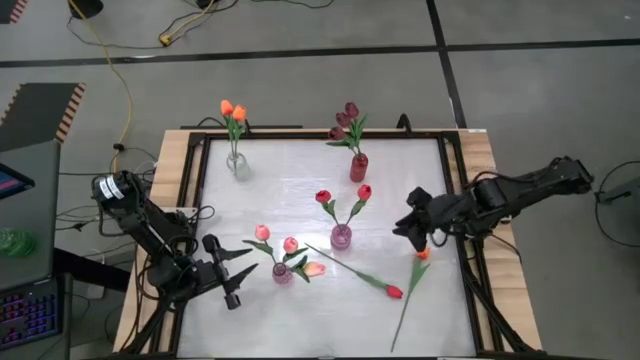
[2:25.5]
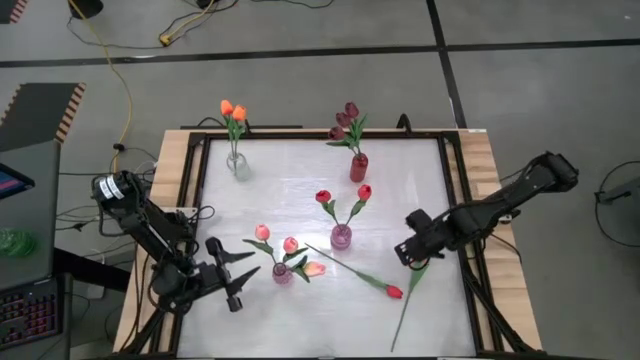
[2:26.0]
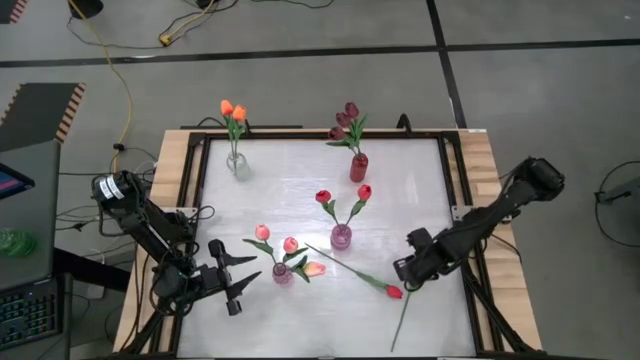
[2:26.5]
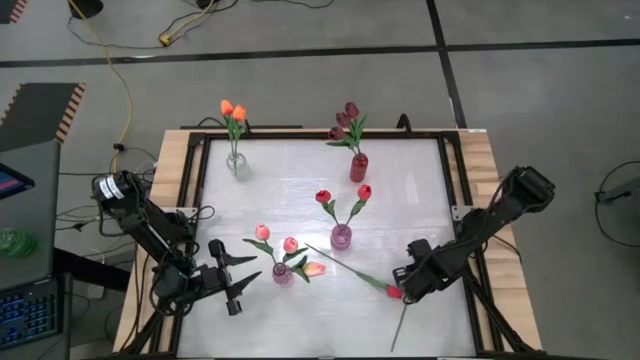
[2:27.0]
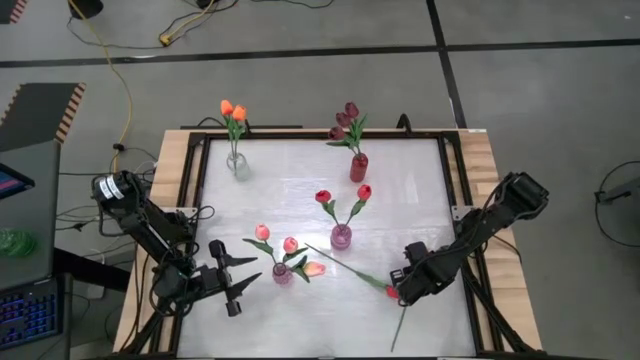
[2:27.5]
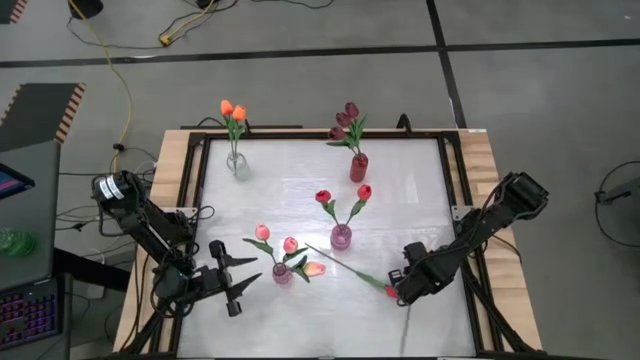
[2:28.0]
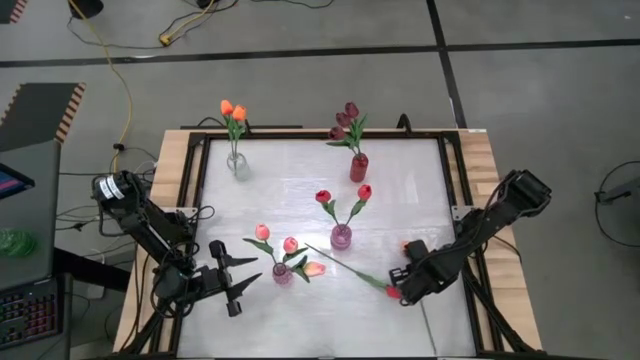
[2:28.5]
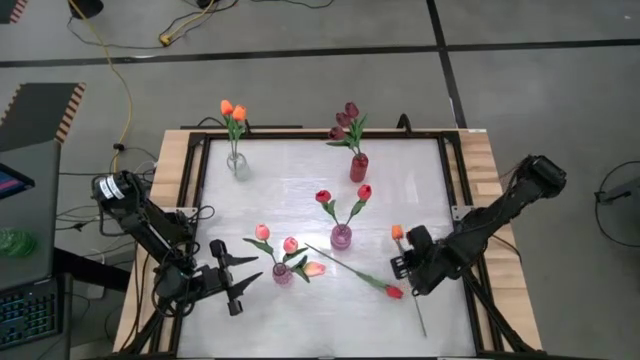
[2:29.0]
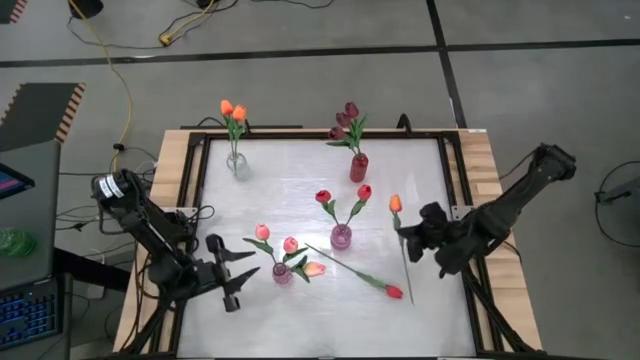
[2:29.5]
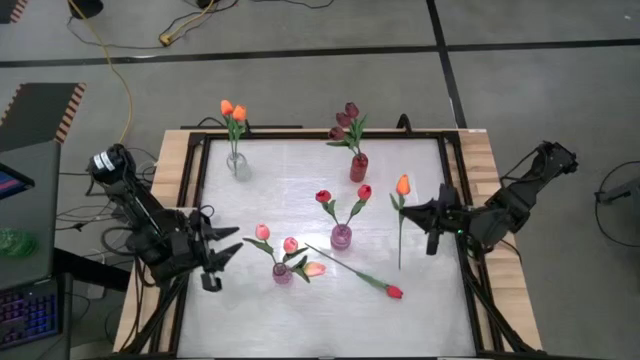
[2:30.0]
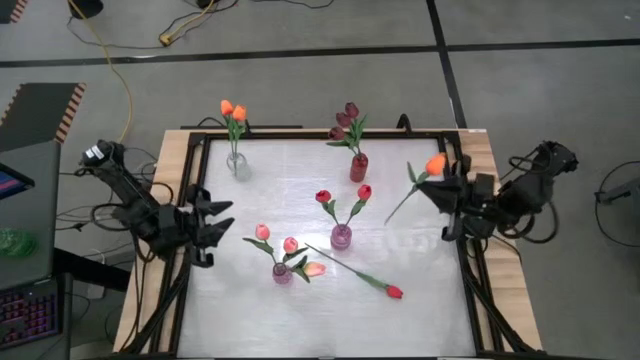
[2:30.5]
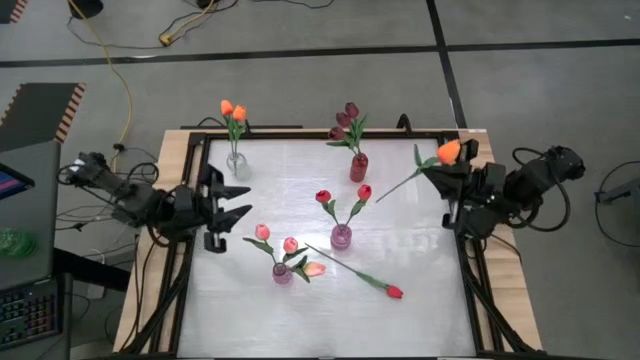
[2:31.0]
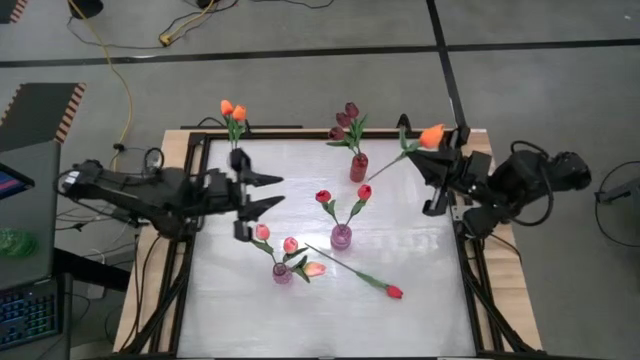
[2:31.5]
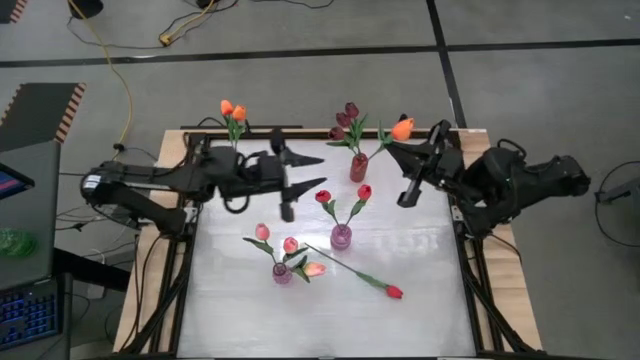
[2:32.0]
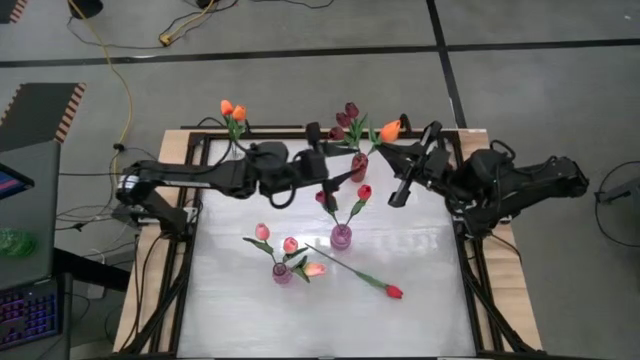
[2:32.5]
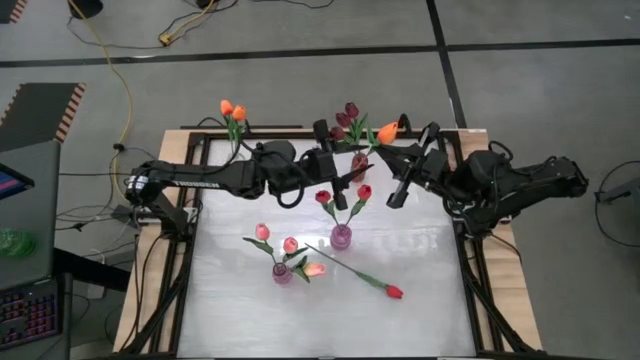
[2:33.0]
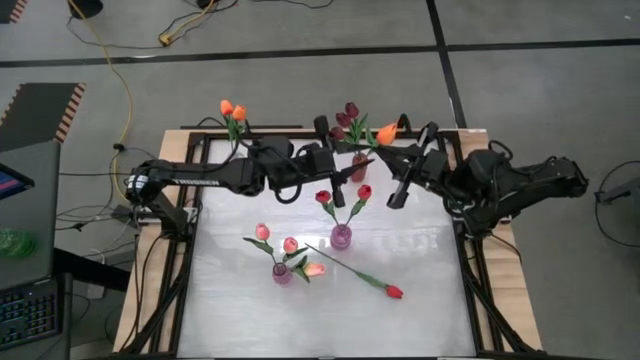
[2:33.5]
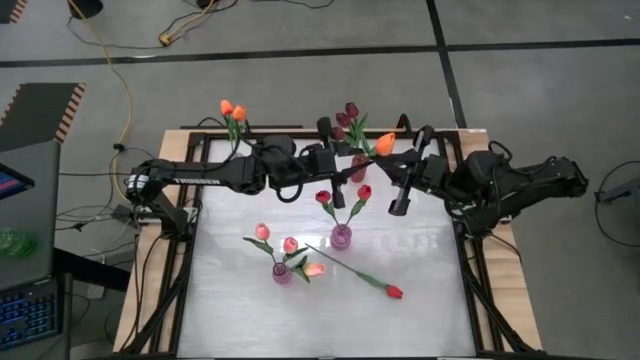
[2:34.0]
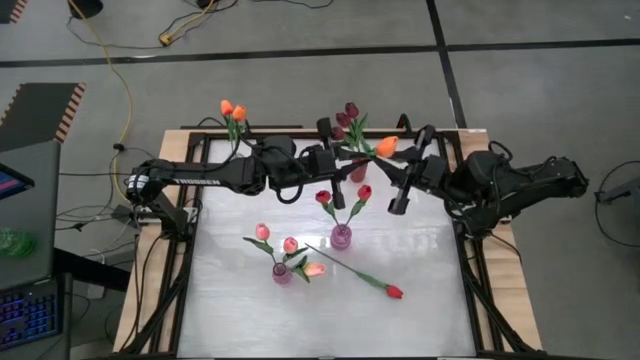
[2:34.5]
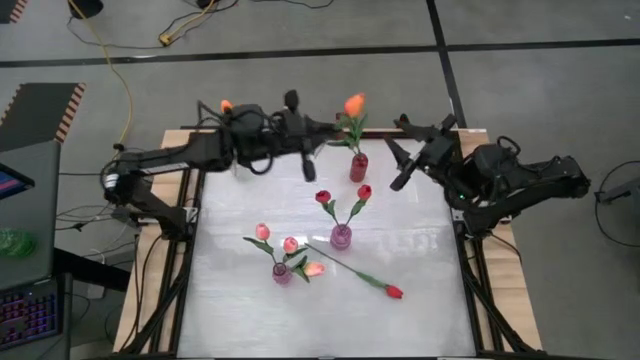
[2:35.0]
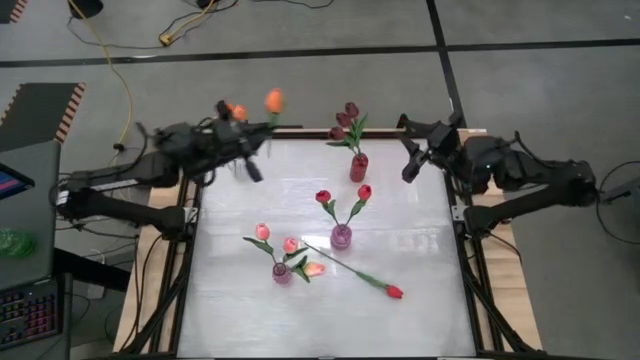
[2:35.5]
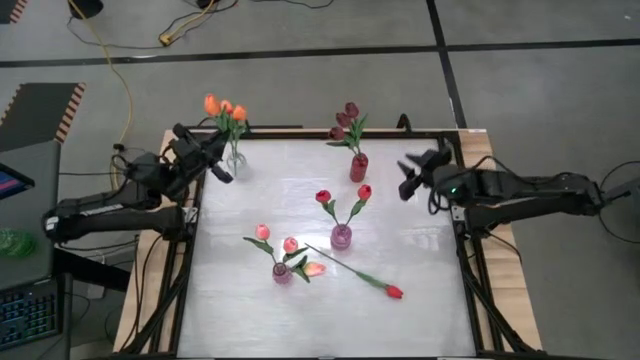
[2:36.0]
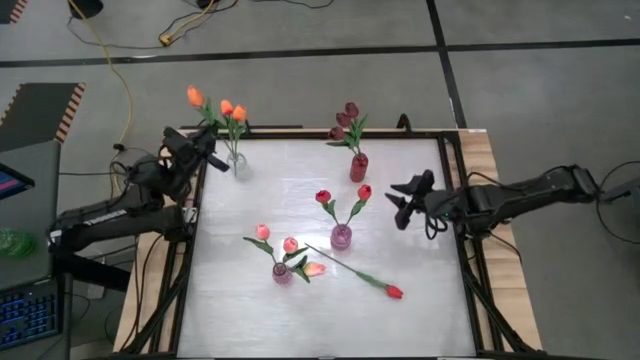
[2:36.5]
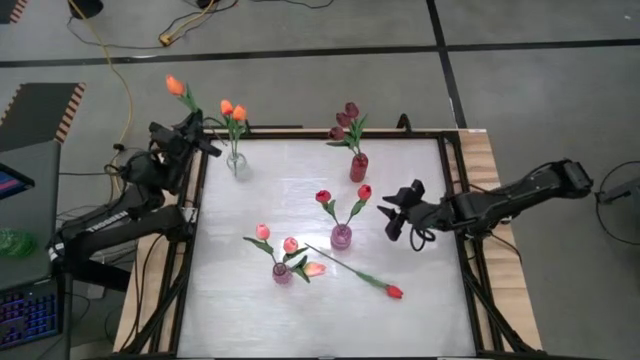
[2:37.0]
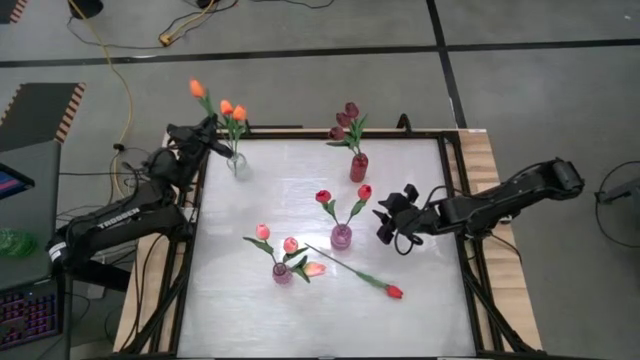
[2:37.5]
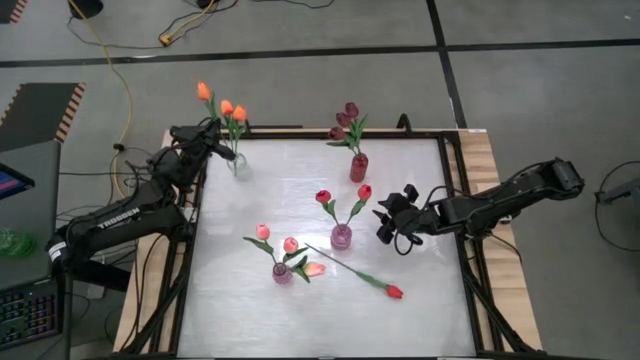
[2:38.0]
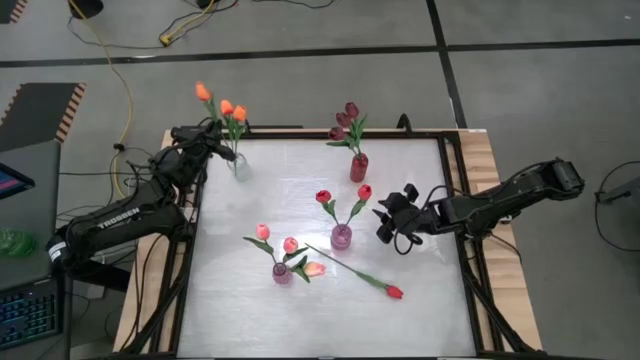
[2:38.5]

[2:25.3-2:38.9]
Task: Sort flowers into vase by color
Put the orange flower into the clear vase

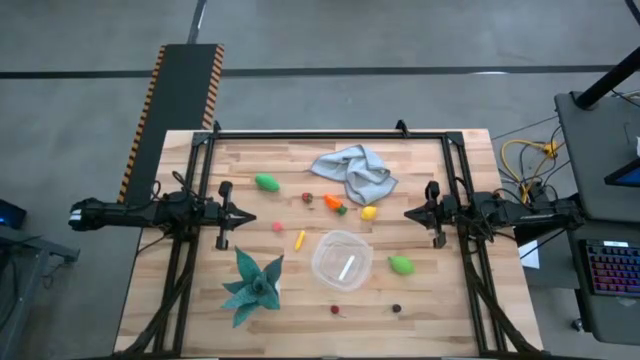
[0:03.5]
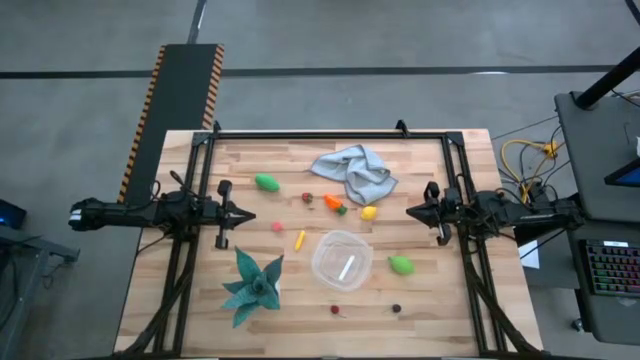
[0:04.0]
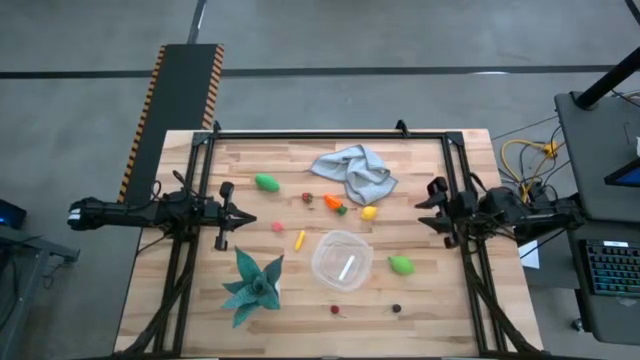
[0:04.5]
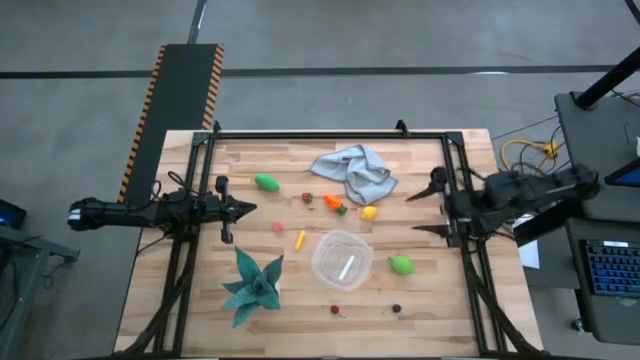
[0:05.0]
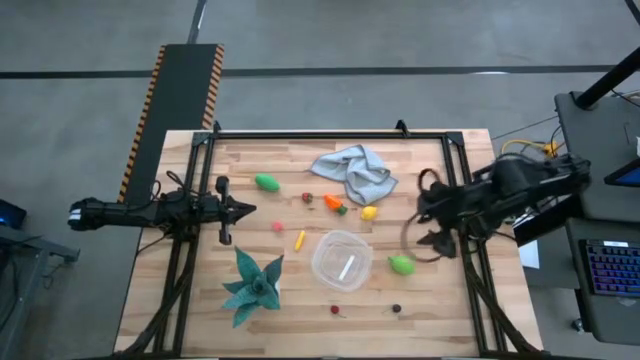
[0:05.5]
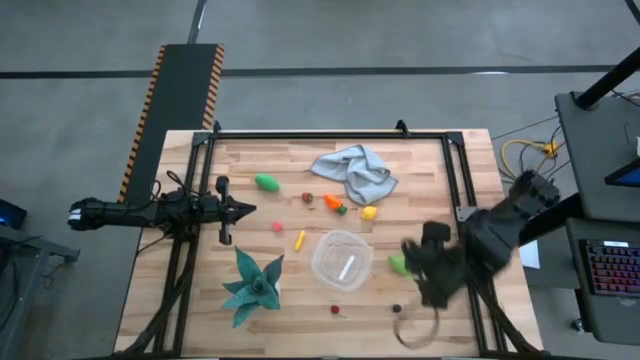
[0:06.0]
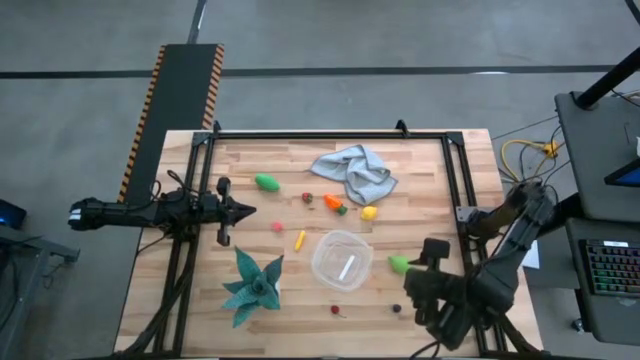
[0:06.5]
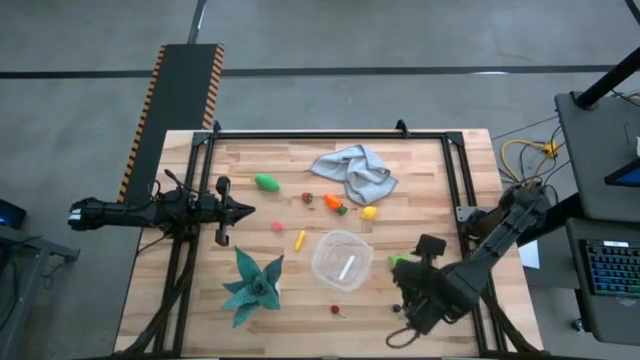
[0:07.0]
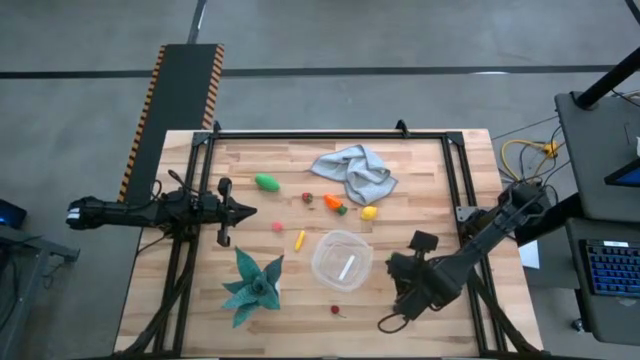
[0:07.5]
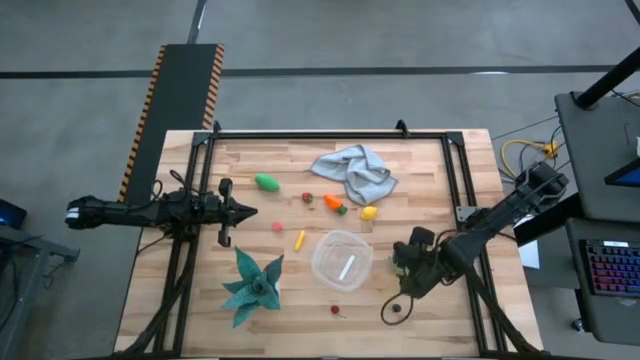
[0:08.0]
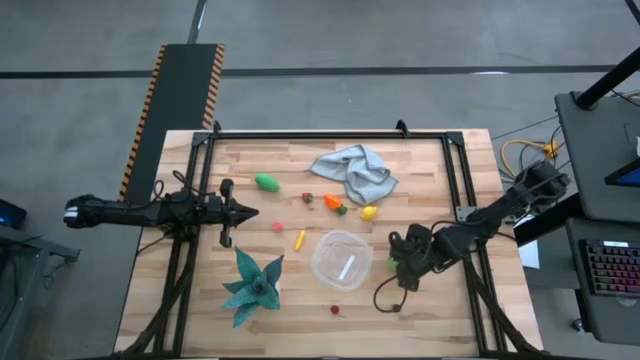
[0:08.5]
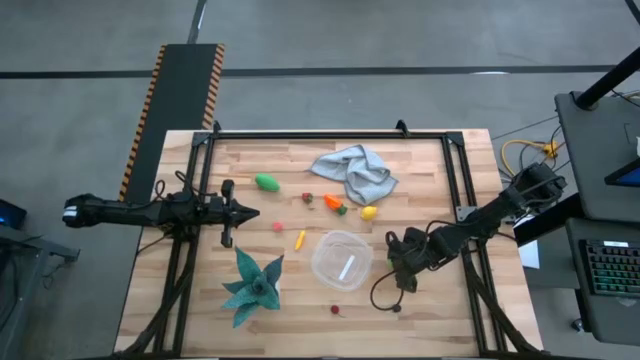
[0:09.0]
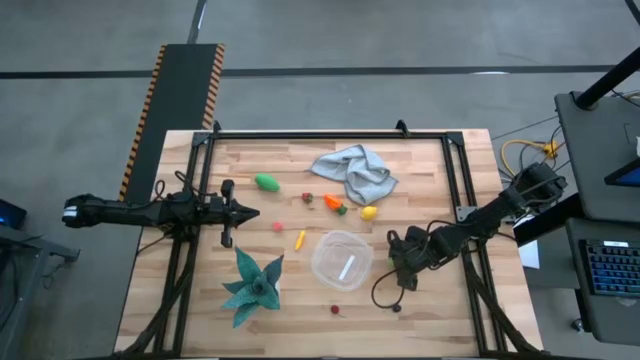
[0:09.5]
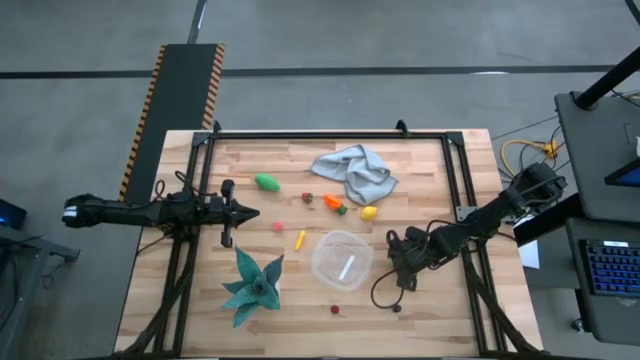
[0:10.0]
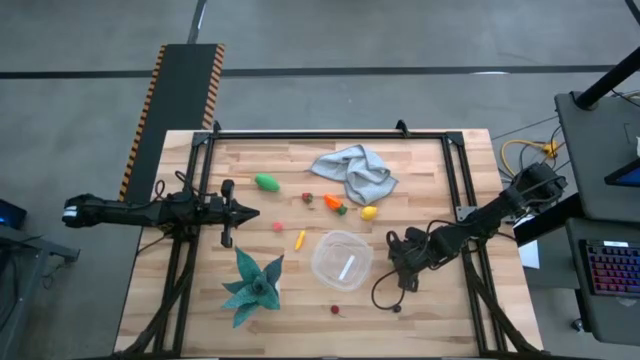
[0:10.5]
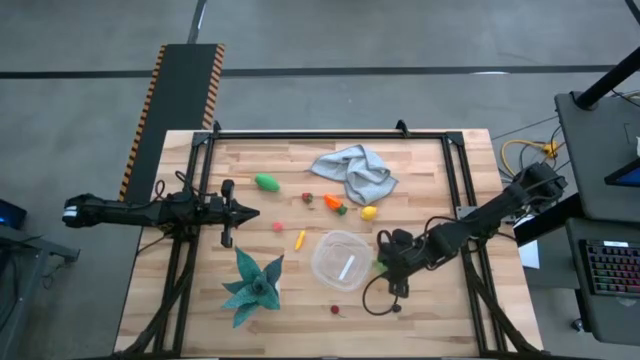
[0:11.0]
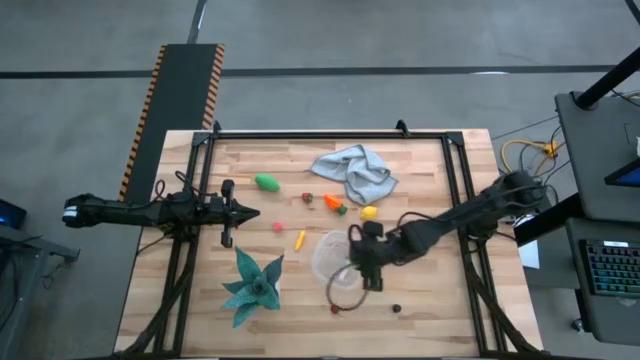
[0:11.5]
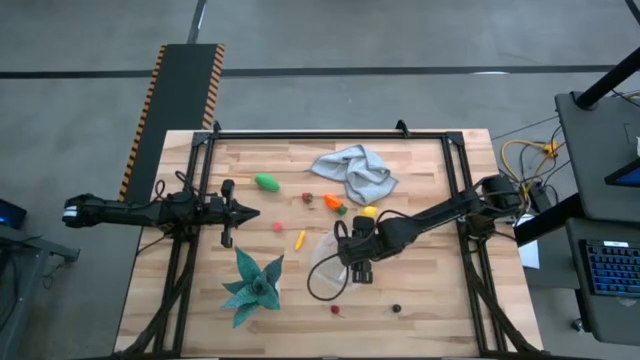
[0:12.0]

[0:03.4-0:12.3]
Task: Pick and placing Produce into tupperware
Put the melon into the container
